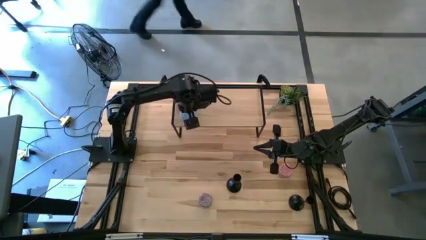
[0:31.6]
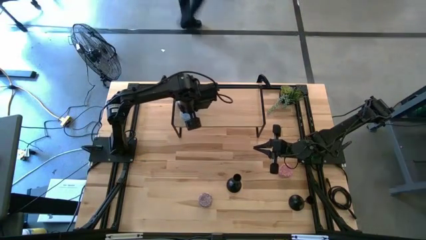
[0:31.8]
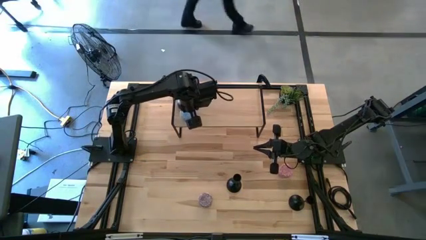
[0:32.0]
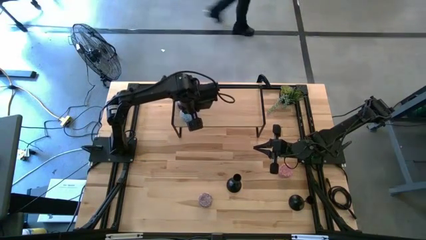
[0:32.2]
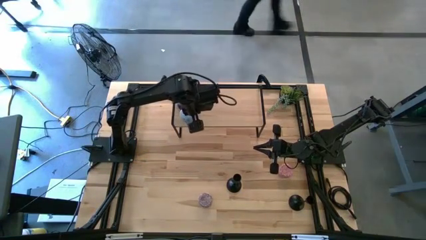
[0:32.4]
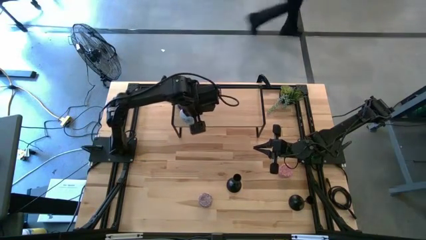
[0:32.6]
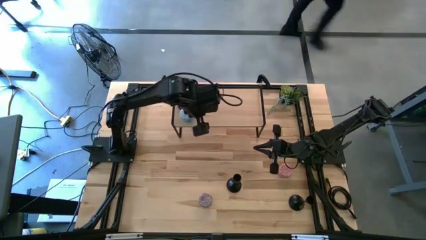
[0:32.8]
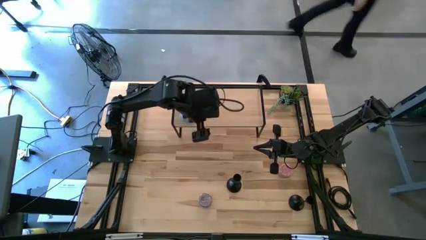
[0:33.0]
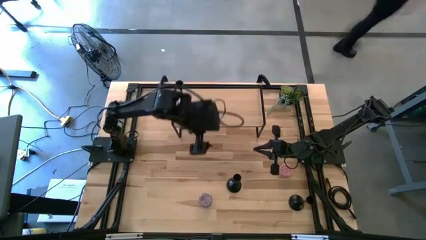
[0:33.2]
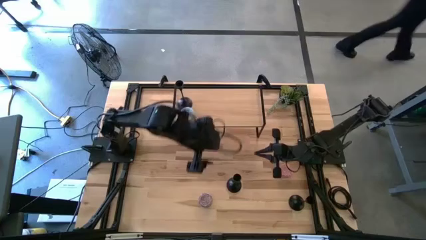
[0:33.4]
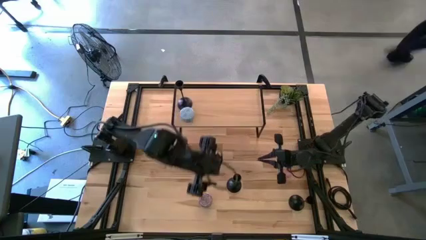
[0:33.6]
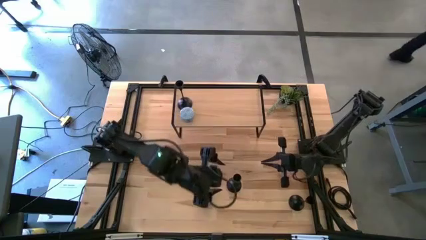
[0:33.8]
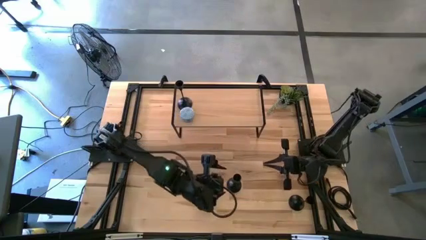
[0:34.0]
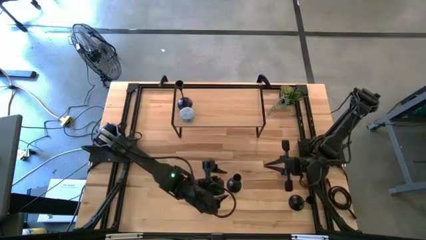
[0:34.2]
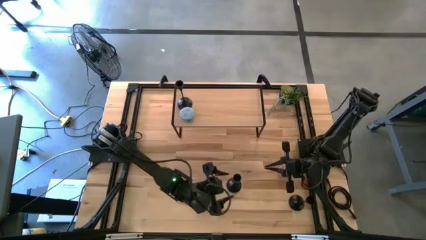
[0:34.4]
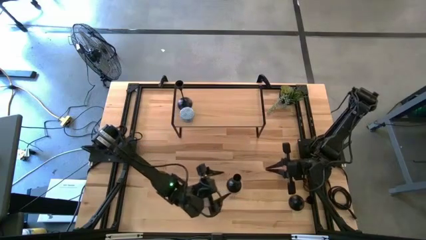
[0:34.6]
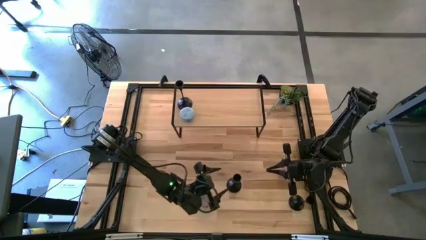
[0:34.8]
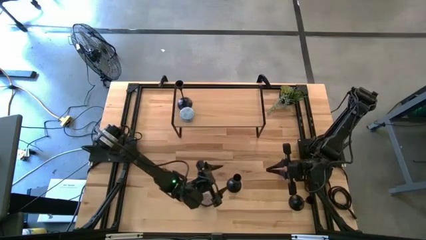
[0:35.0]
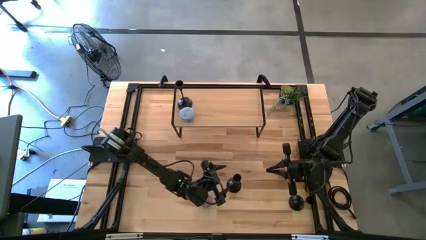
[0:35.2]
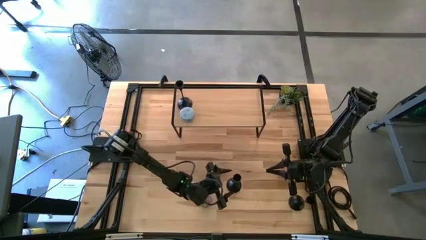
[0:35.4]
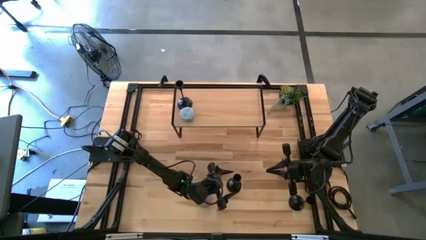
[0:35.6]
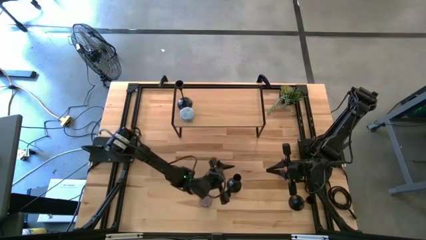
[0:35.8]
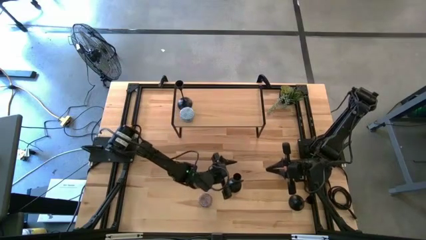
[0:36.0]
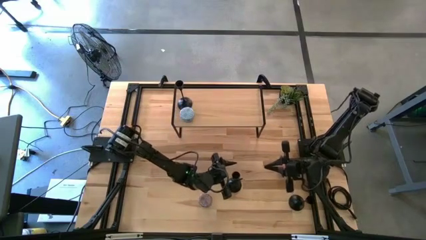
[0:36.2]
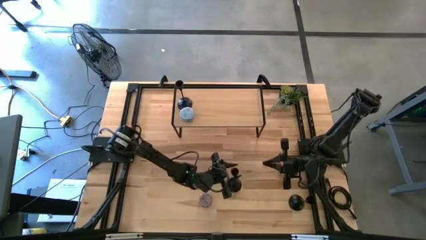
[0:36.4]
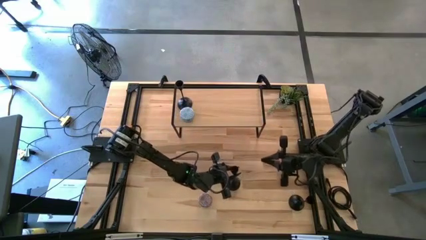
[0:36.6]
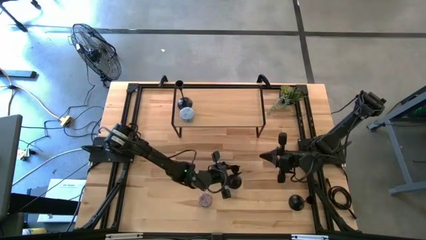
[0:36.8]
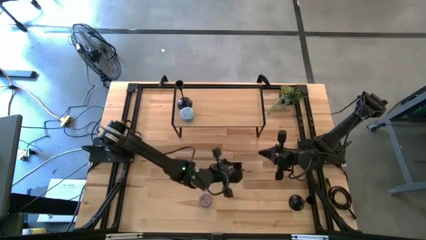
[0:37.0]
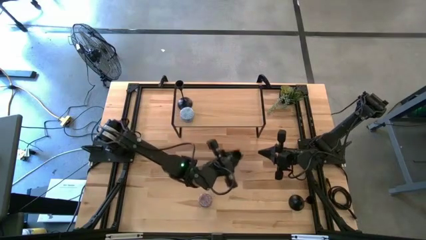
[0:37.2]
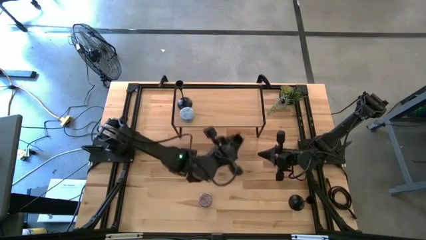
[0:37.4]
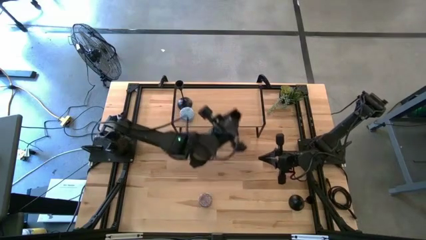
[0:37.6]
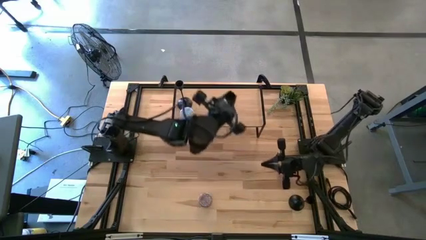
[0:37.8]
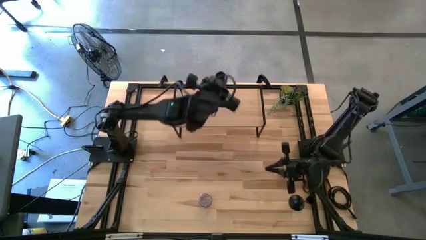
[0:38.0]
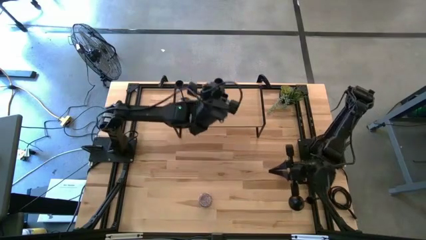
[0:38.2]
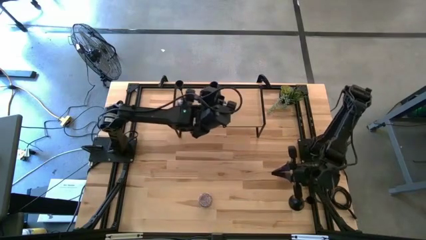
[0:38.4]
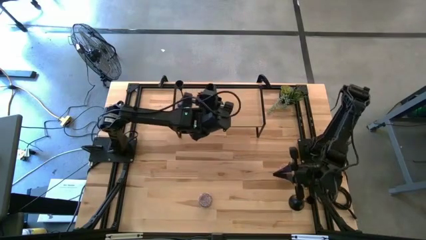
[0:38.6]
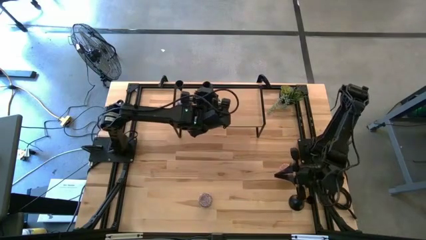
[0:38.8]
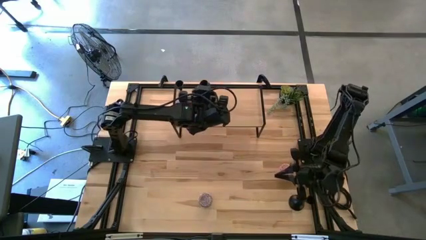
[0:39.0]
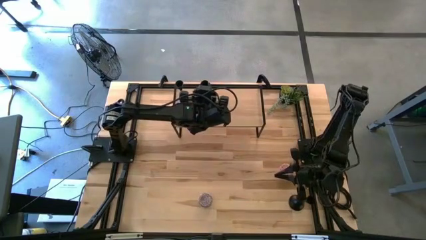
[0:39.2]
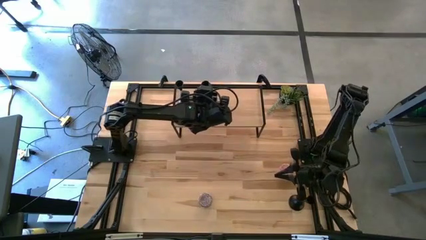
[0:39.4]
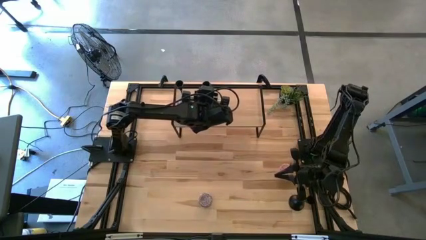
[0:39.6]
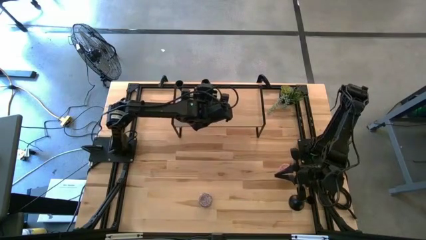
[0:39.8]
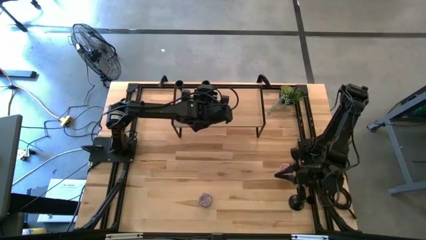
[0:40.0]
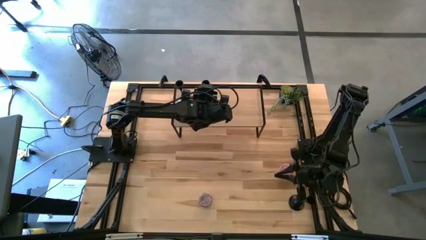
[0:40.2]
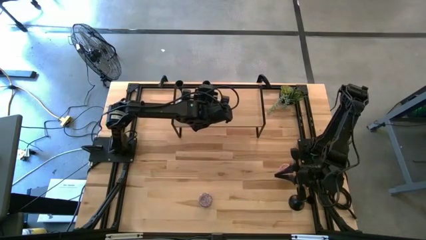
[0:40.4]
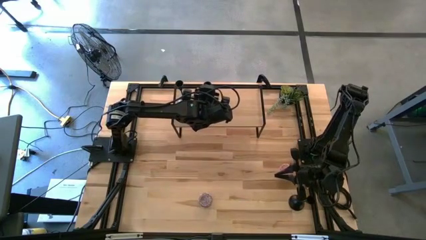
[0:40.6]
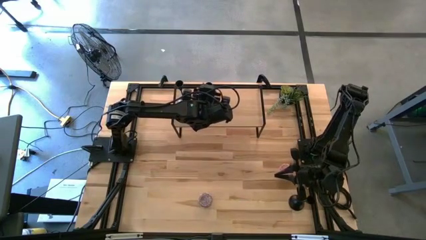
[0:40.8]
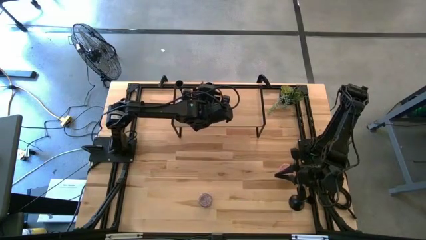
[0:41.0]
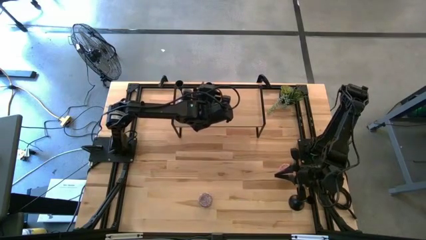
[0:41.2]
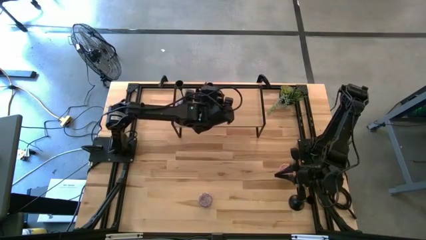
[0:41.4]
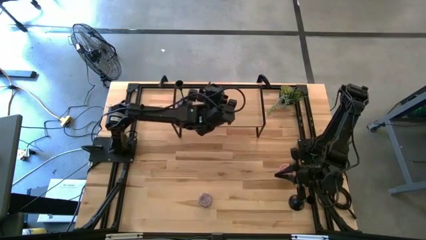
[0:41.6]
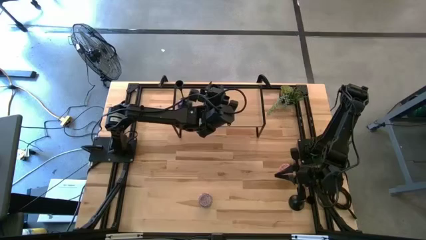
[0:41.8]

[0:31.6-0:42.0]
Task: Pick & Place candle stick holders
Put the left black candle holder on the shelf
